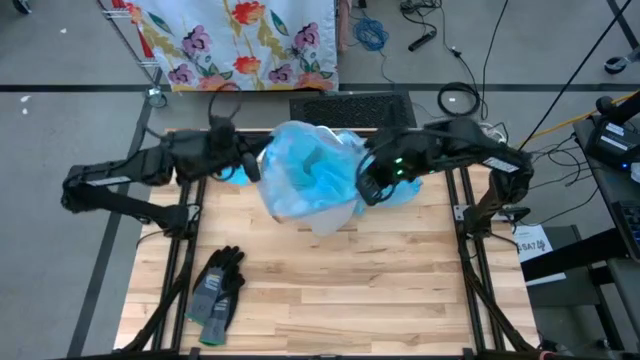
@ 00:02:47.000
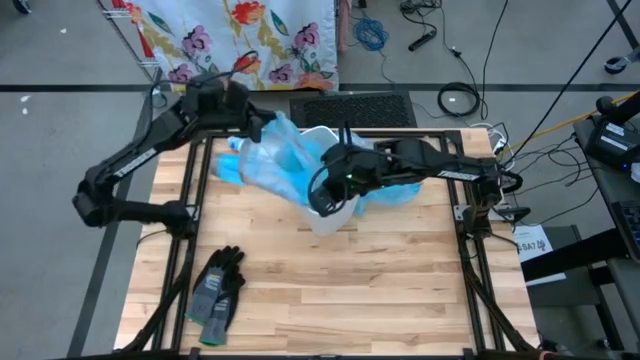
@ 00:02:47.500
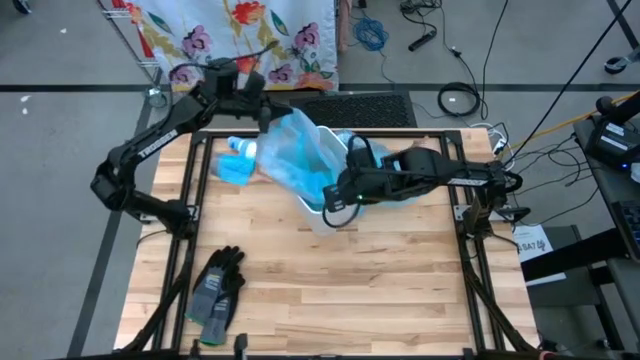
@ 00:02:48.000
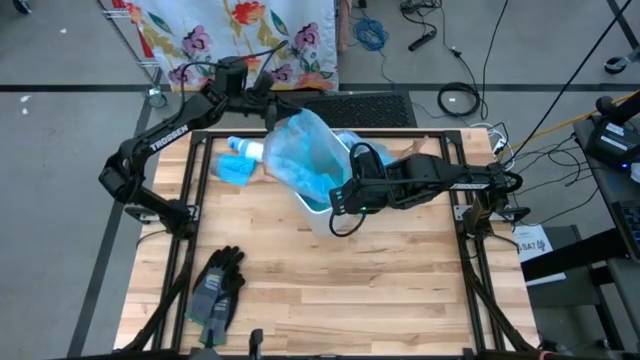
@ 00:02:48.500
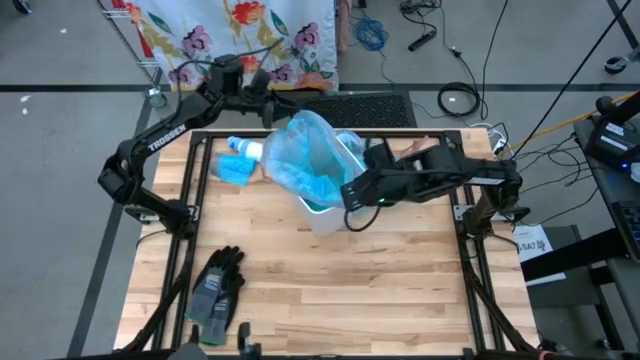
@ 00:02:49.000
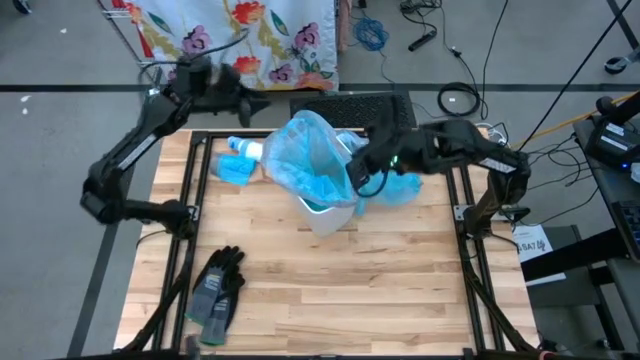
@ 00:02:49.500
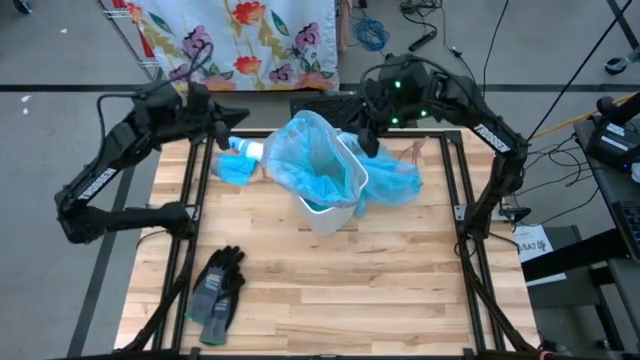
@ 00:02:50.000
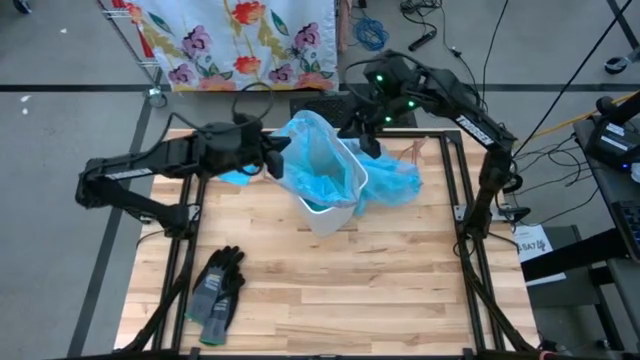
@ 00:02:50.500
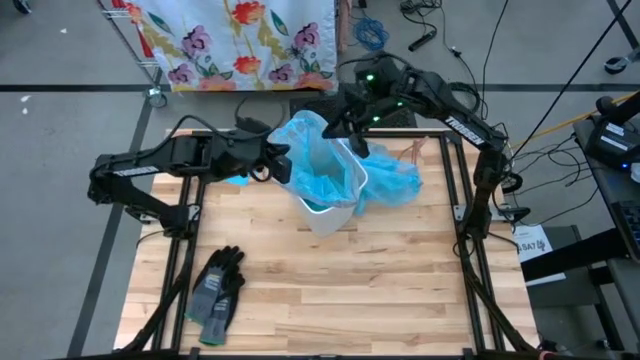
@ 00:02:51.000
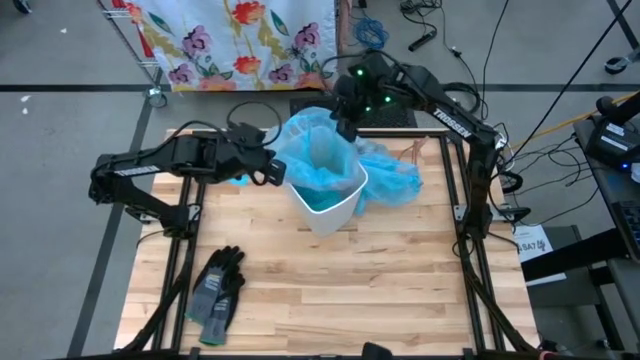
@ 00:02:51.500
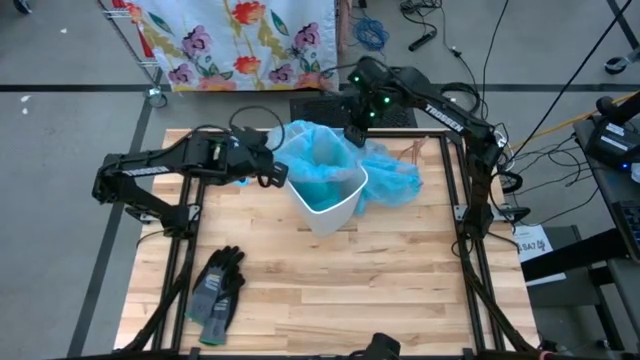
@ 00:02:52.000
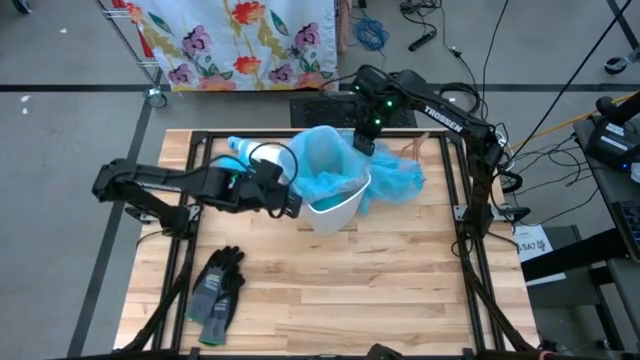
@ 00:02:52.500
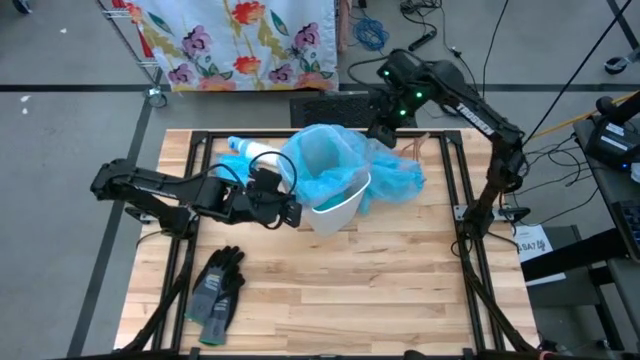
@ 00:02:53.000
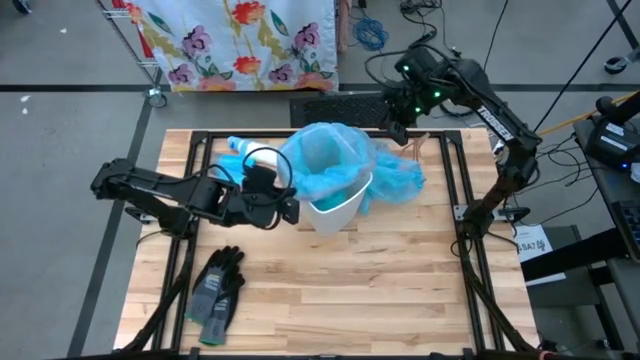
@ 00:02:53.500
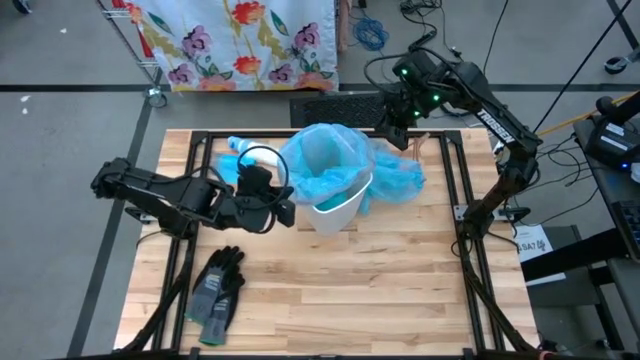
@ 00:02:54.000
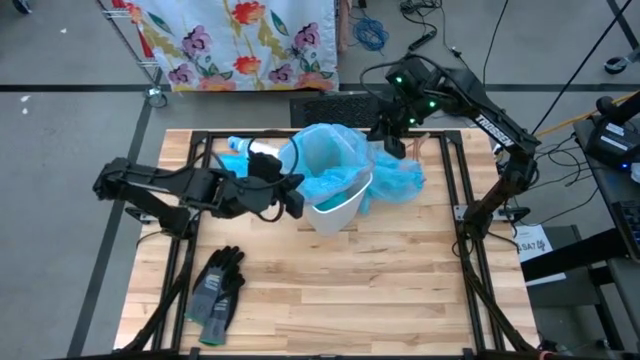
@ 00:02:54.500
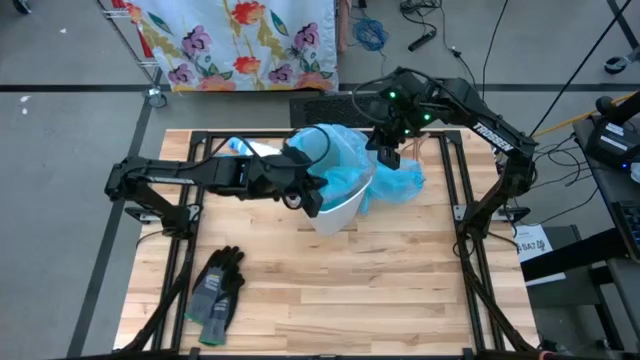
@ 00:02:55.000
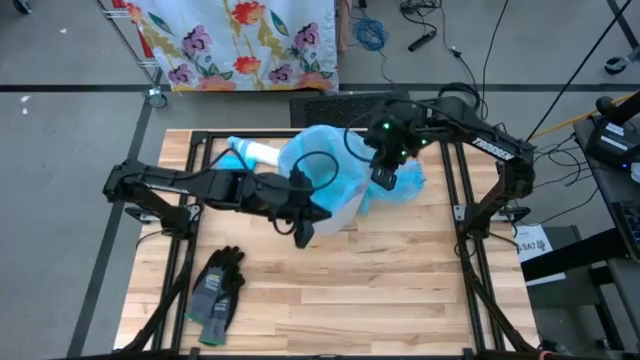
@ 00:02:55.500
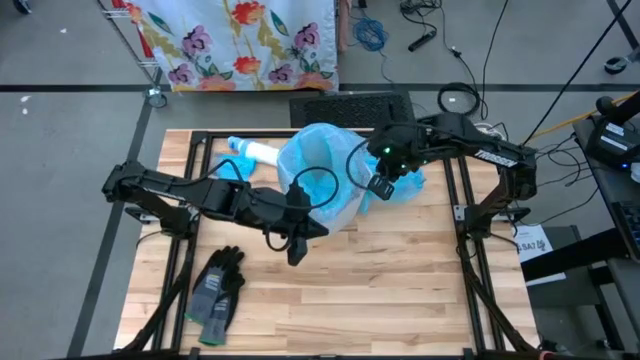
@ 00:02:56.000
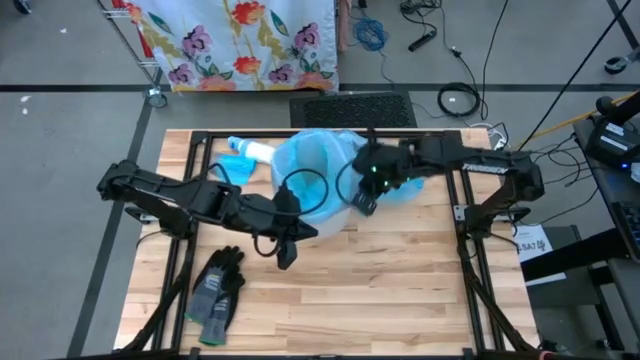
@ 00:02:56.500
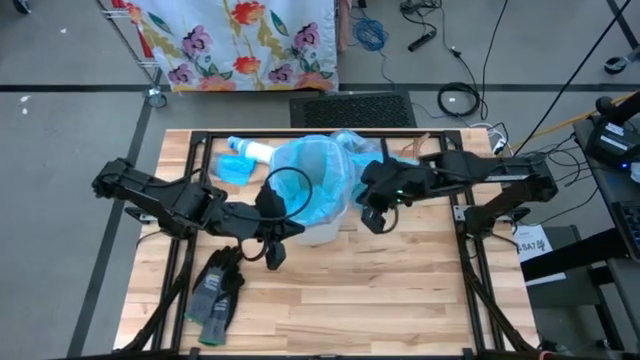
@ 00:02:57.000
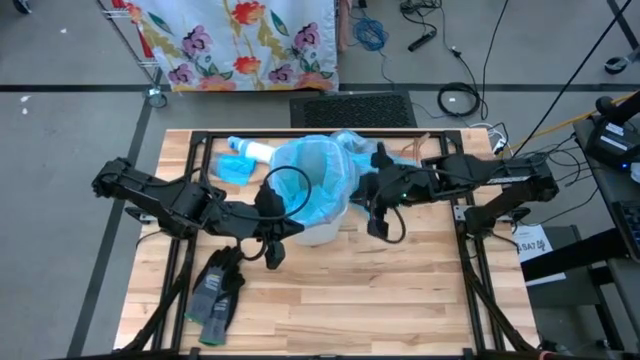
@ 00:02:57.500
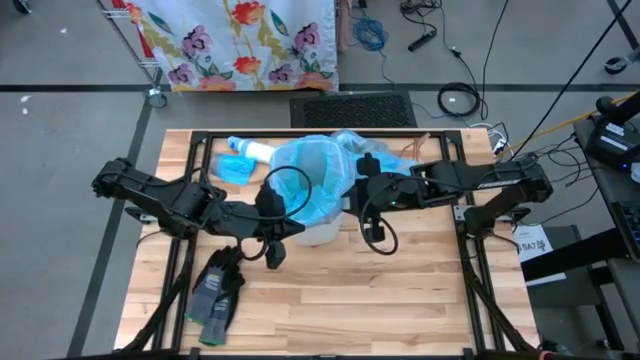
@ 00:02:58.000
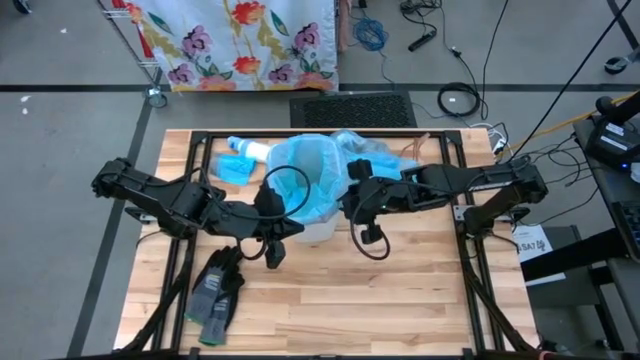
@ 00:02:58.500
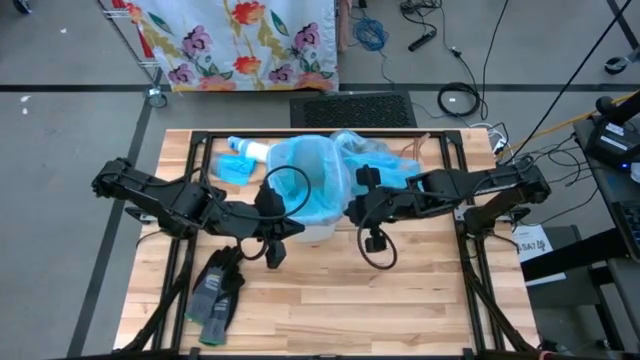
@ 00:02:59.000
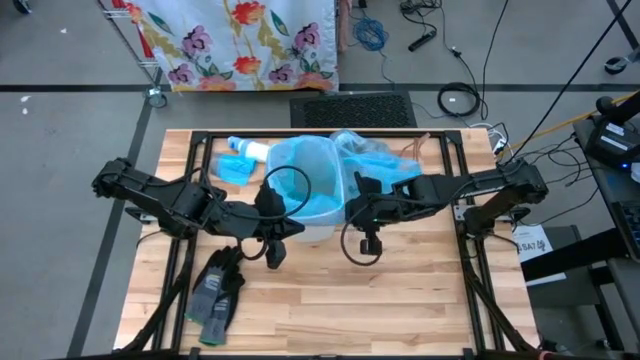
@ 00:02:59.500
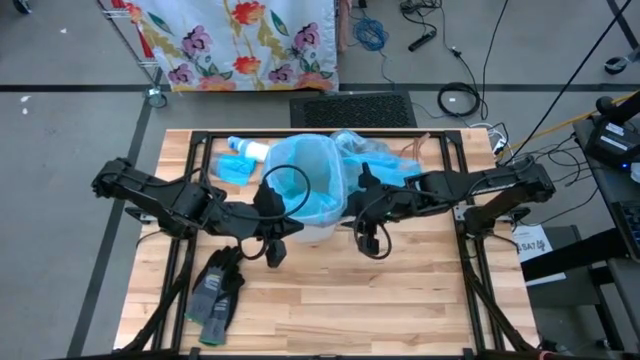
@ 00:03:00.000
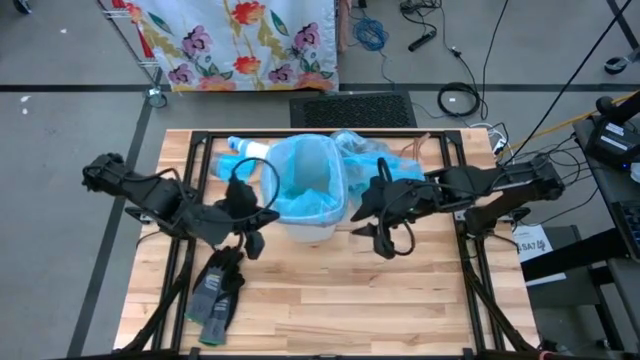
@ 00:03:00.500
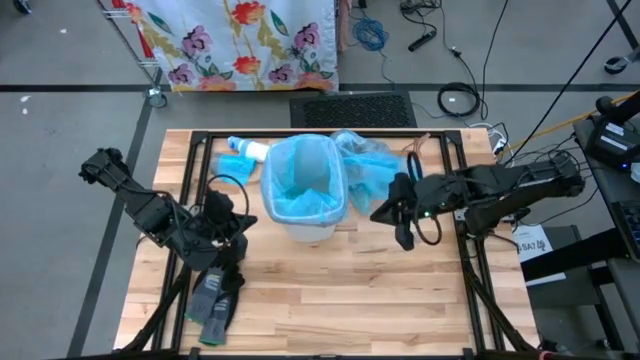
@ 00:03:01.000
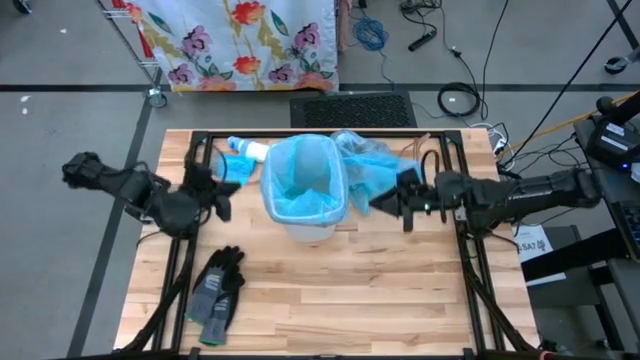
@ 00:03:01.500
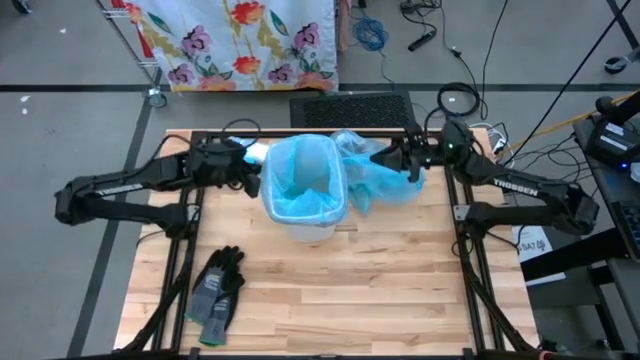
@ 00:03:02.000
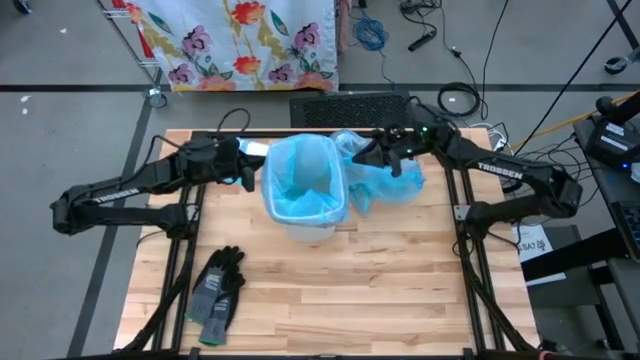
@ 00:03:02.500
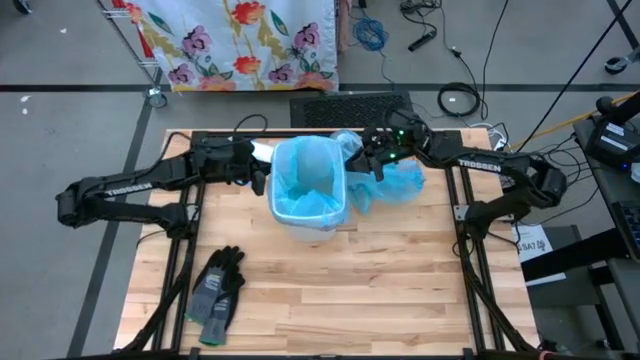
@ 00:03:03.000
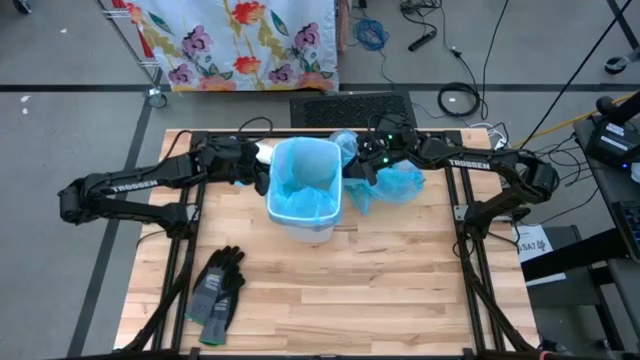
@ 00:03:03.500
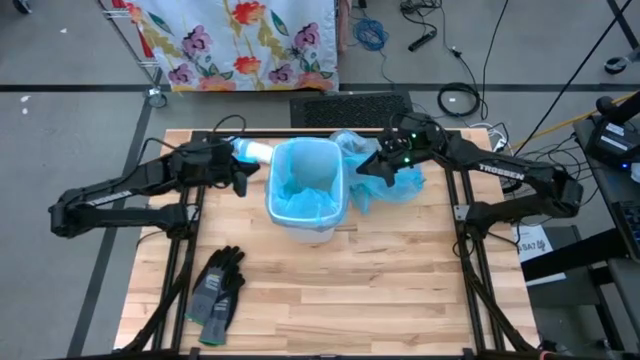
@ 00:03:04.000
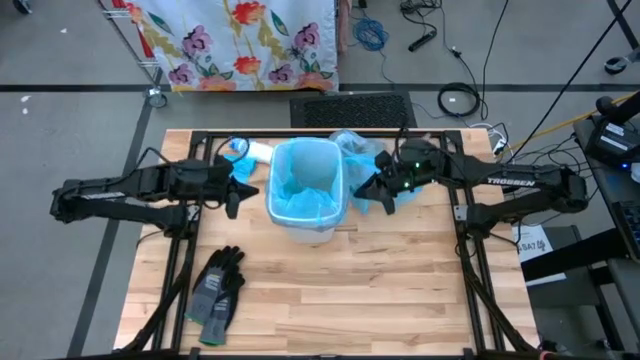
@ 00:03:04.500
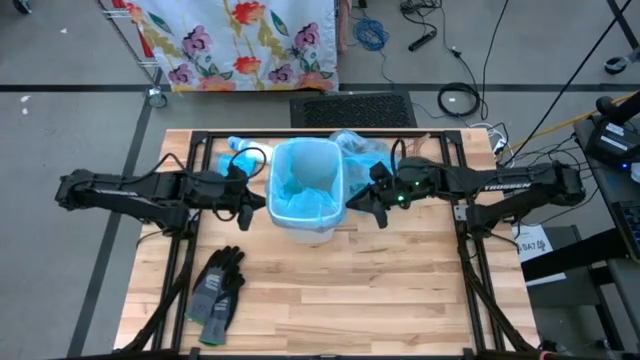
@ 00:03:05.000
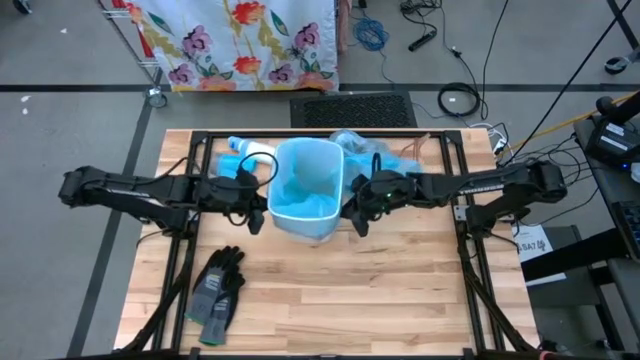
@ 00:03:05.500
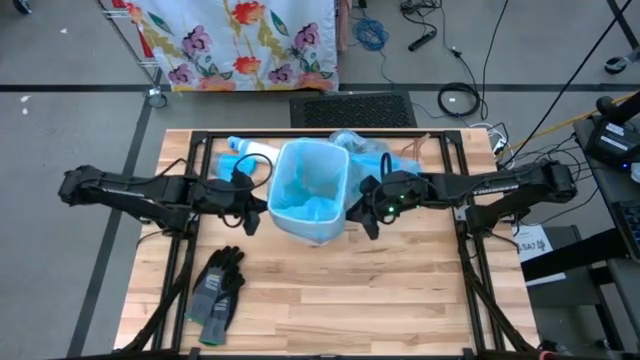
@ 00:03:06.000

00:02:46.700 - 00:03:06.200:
Task: place trash/remove bag and relplace
Put the trash bag into the trash bin

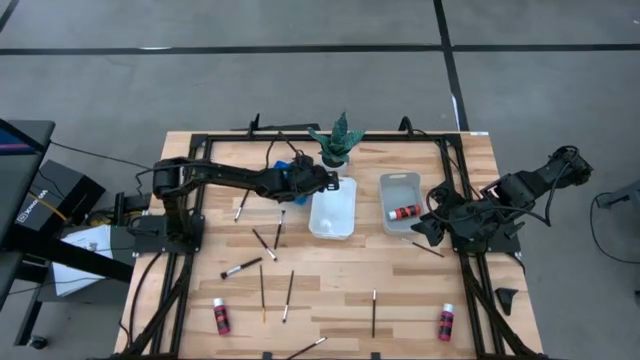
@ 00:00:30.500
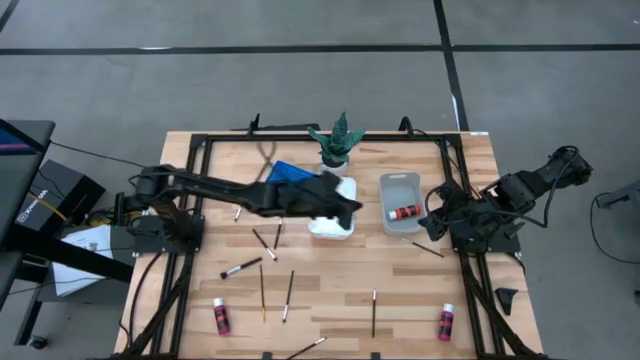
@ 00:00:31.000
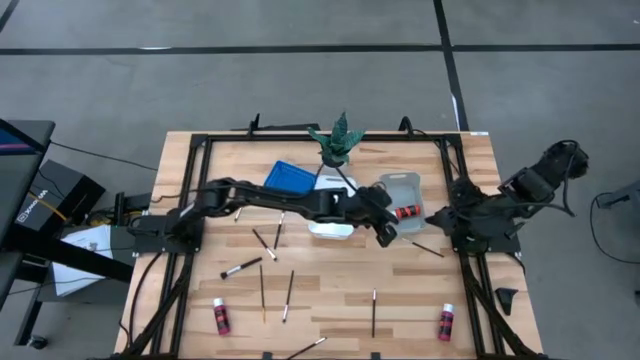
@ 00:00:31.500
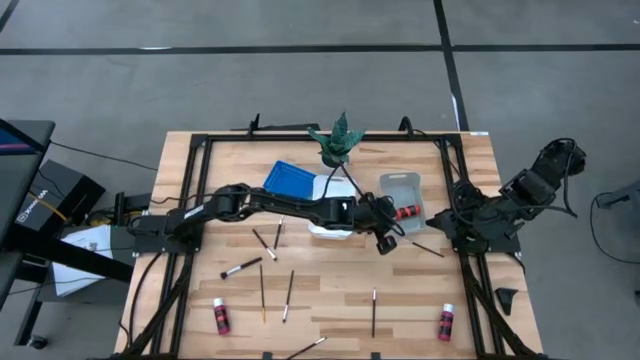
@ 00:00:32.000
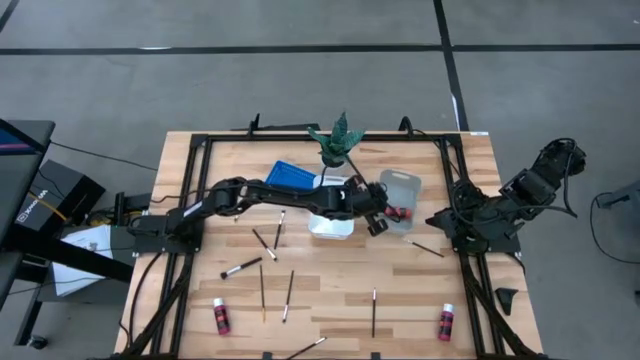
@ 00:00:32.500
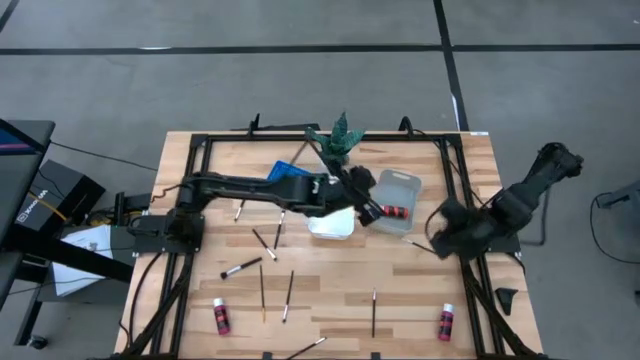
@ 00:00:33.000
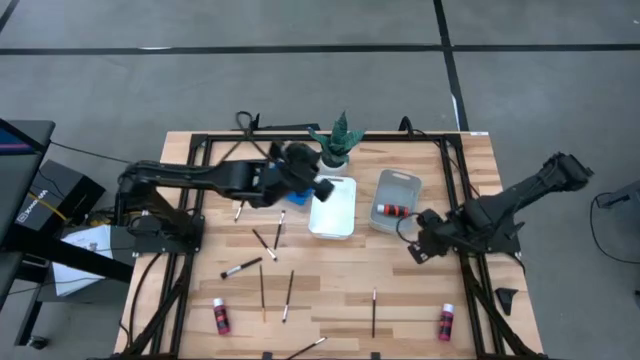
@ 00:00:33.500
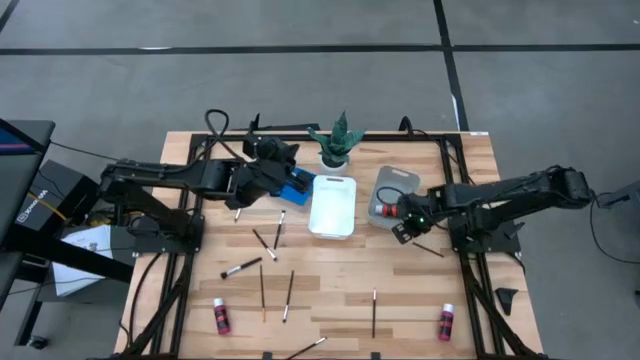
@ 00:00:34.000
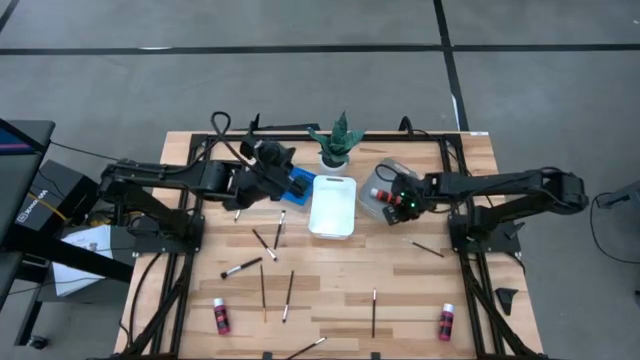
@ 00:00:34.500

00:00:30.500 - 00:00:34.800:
Task: Pick & Place Paint Supplies
Adjust the gray bin
